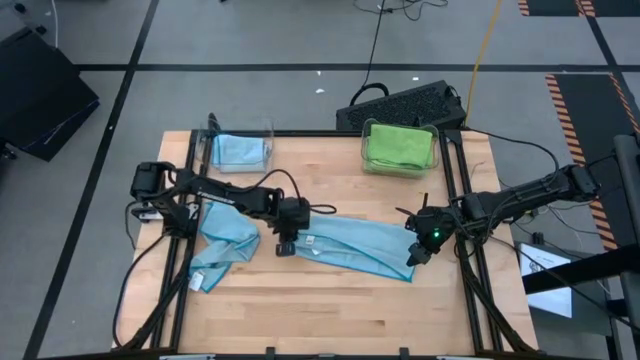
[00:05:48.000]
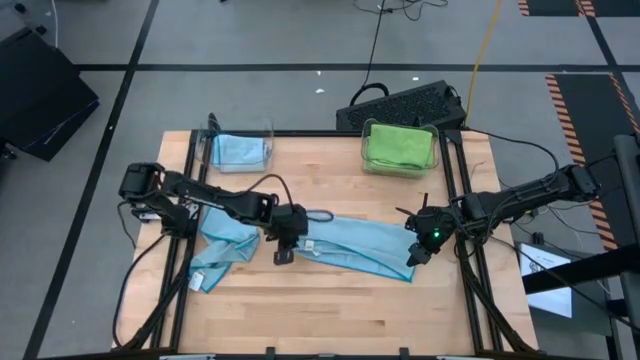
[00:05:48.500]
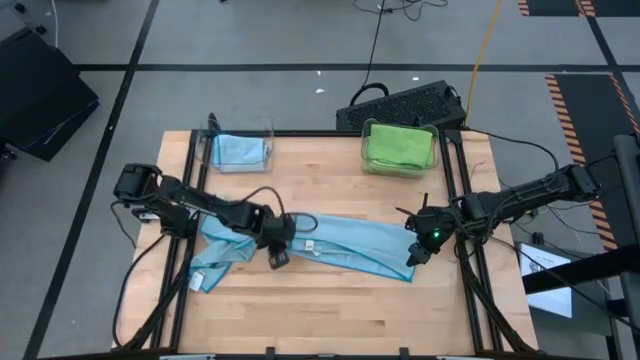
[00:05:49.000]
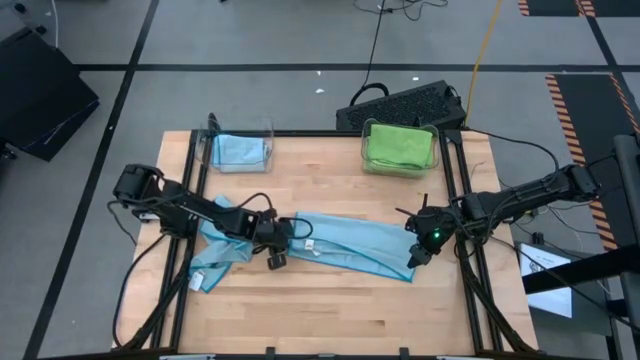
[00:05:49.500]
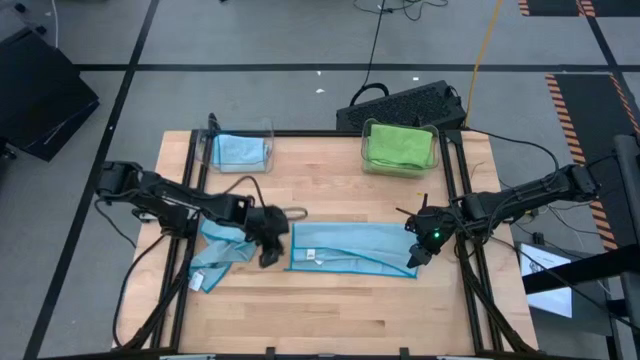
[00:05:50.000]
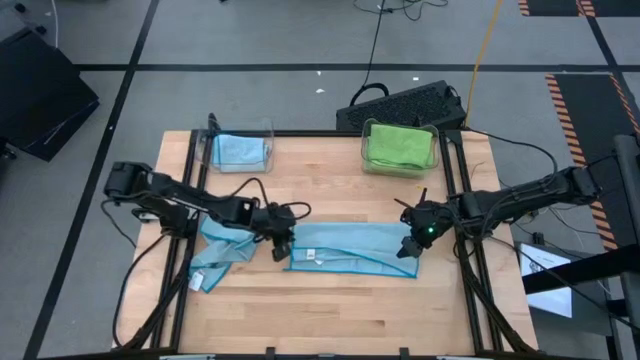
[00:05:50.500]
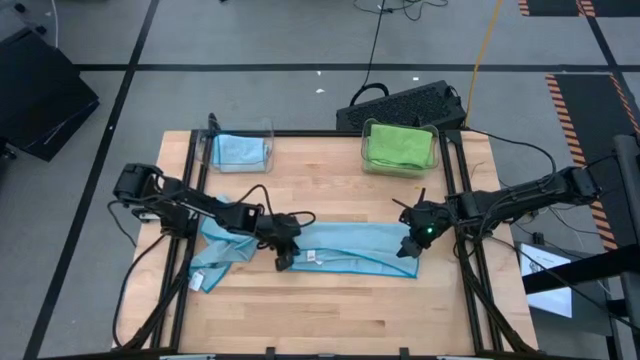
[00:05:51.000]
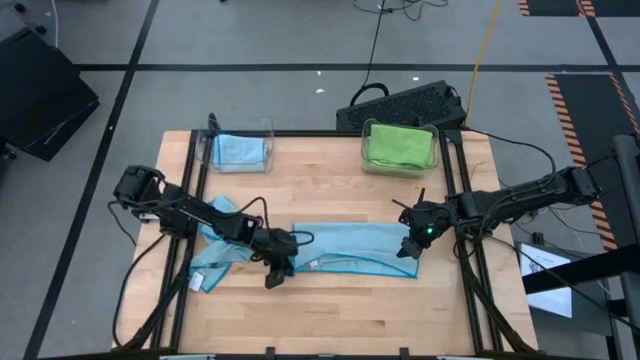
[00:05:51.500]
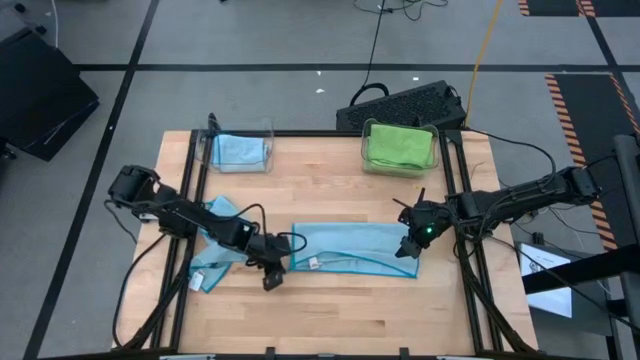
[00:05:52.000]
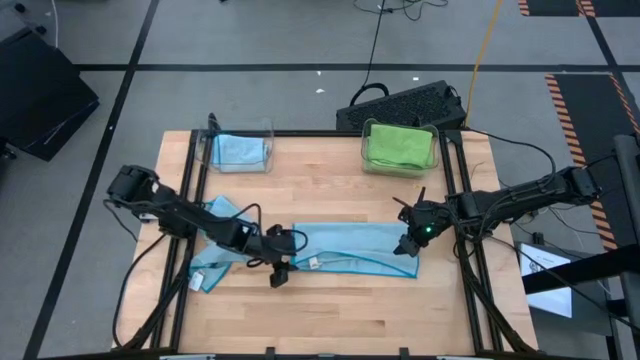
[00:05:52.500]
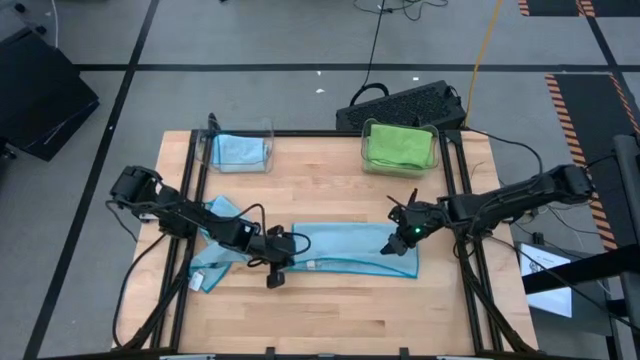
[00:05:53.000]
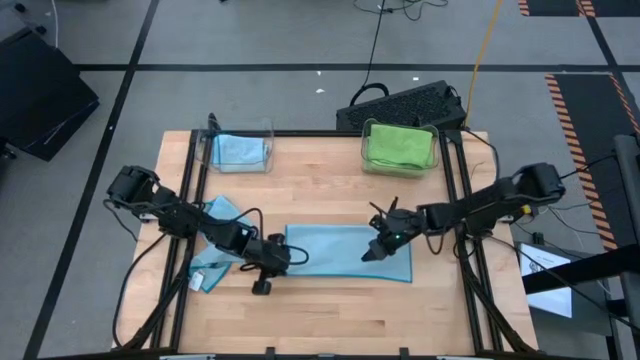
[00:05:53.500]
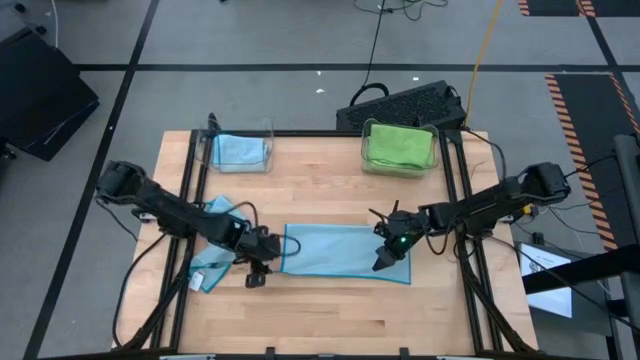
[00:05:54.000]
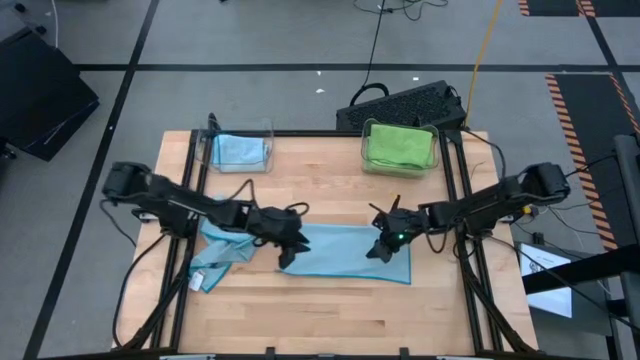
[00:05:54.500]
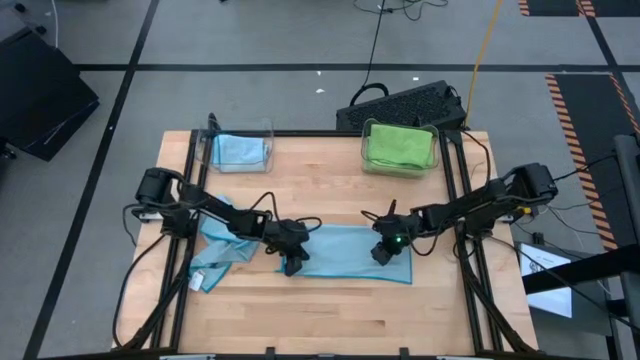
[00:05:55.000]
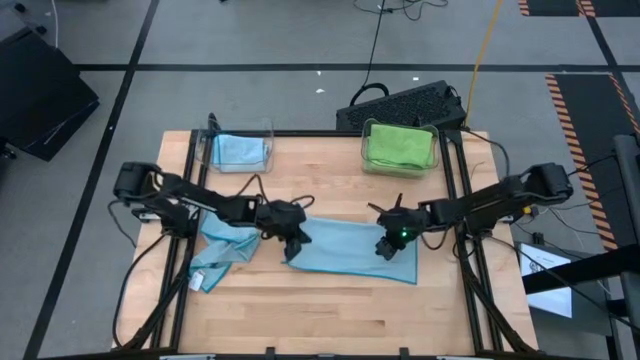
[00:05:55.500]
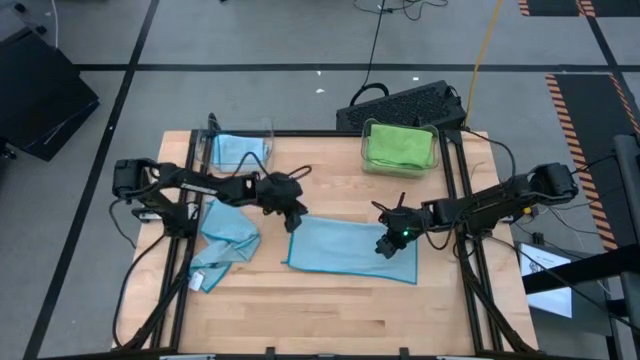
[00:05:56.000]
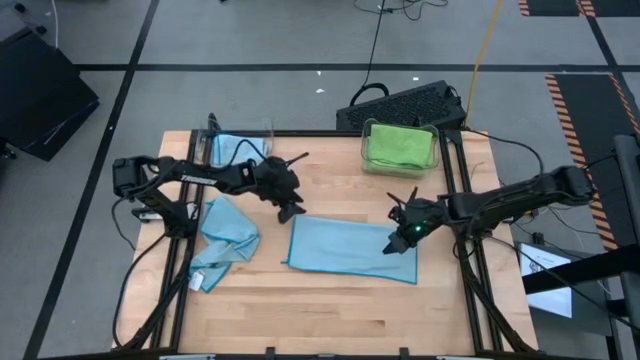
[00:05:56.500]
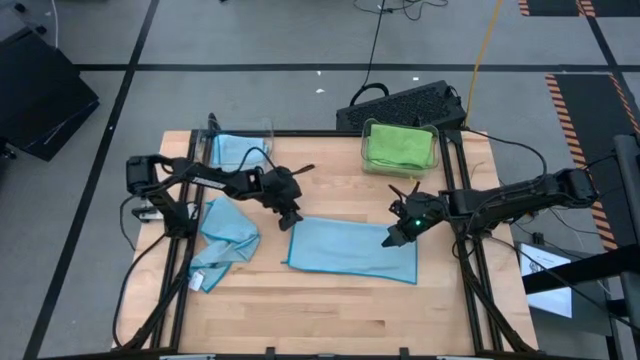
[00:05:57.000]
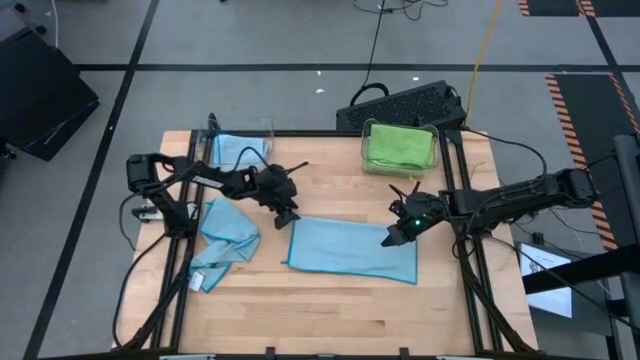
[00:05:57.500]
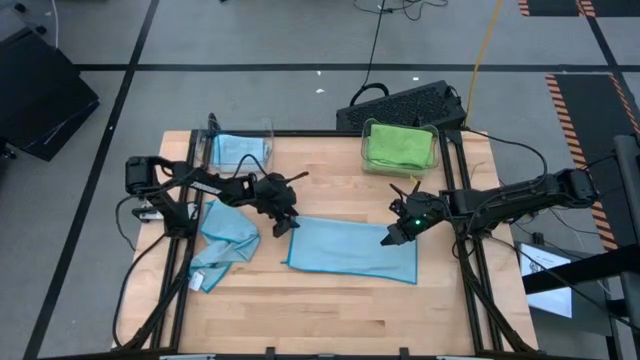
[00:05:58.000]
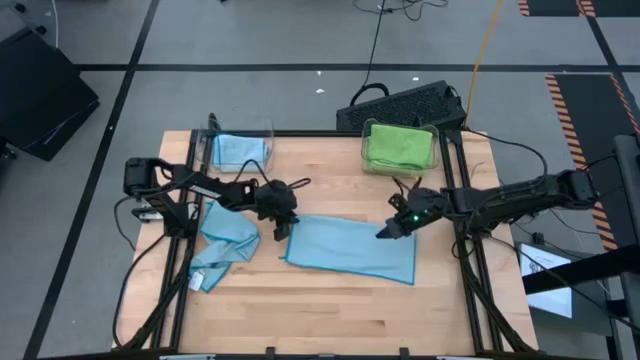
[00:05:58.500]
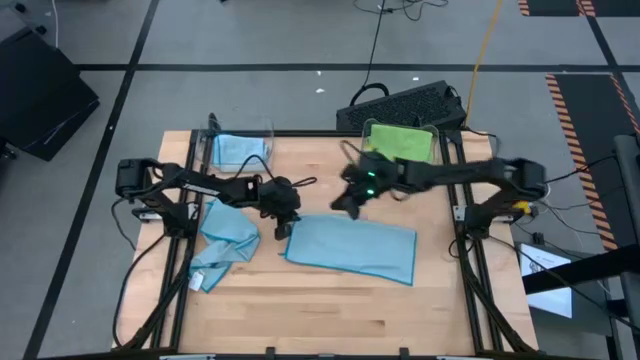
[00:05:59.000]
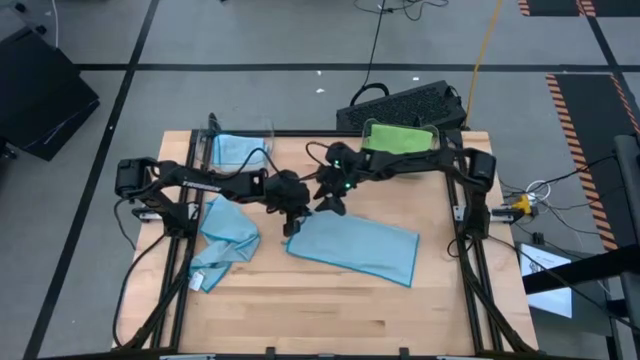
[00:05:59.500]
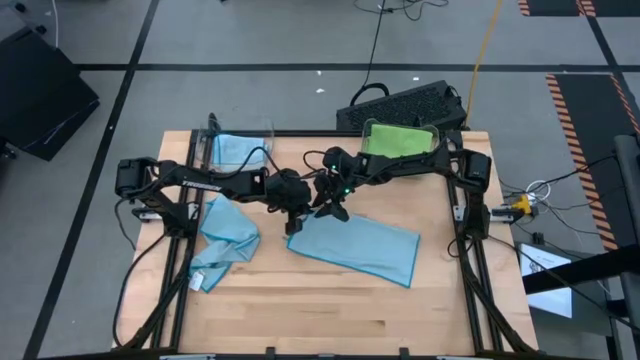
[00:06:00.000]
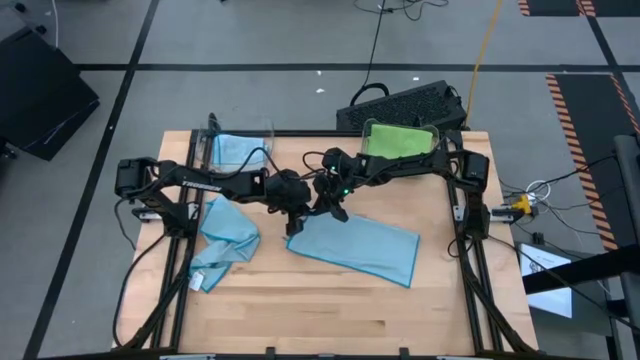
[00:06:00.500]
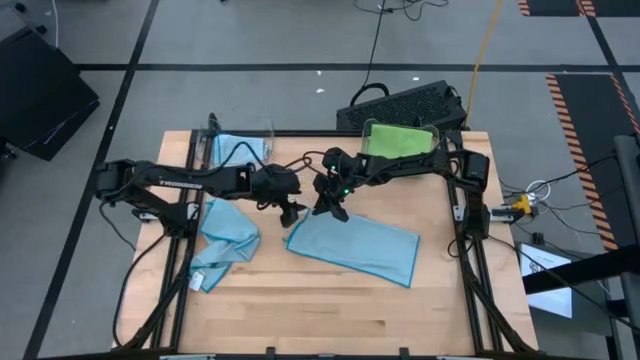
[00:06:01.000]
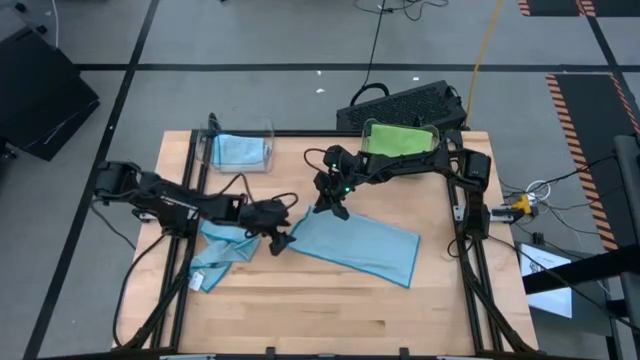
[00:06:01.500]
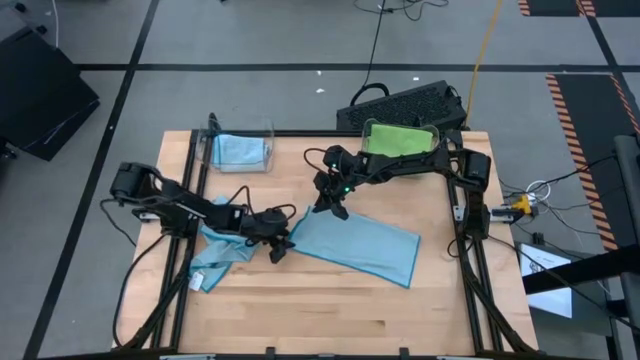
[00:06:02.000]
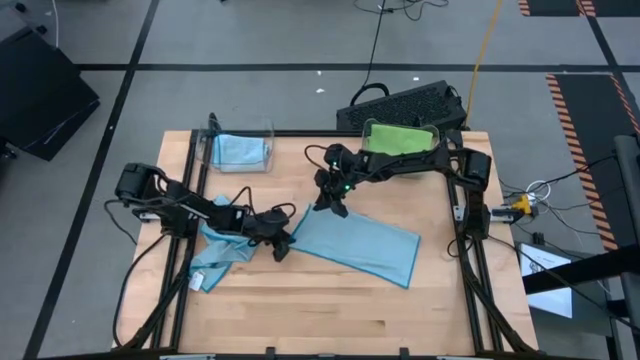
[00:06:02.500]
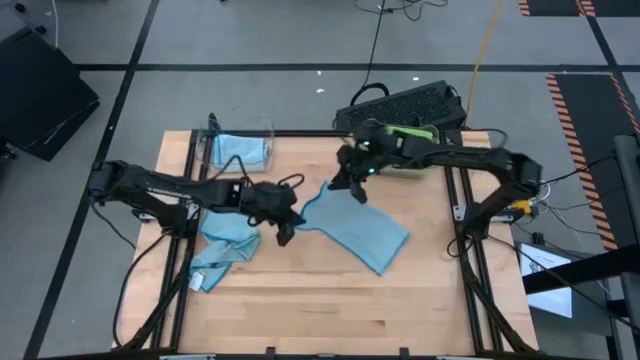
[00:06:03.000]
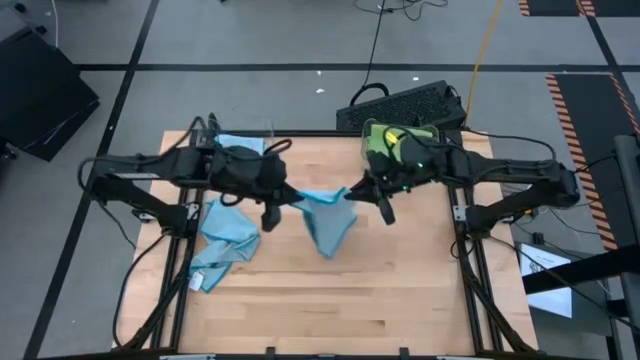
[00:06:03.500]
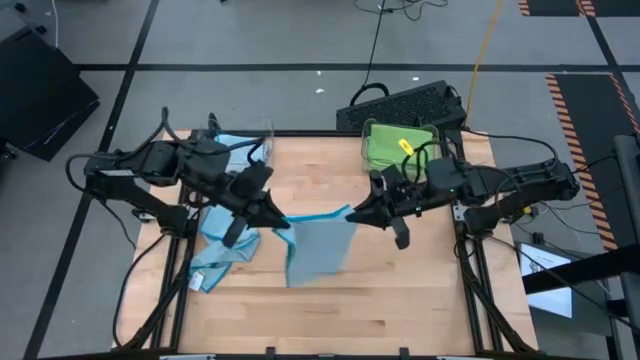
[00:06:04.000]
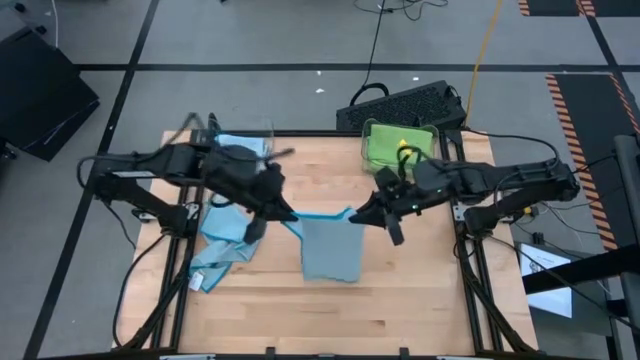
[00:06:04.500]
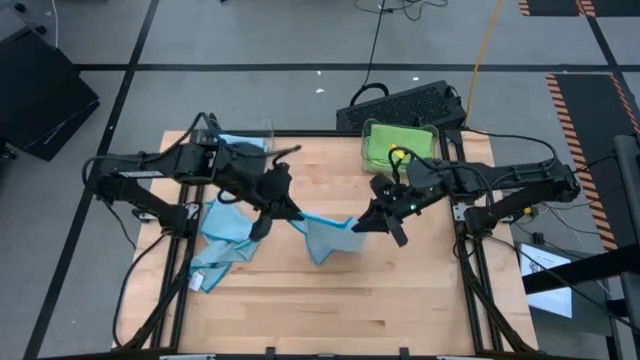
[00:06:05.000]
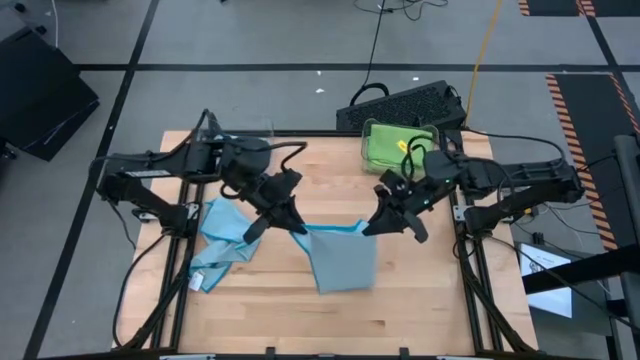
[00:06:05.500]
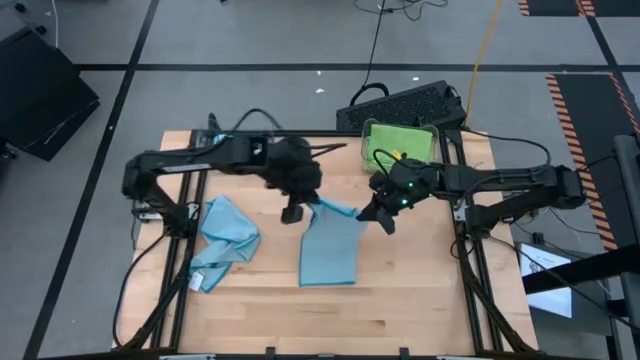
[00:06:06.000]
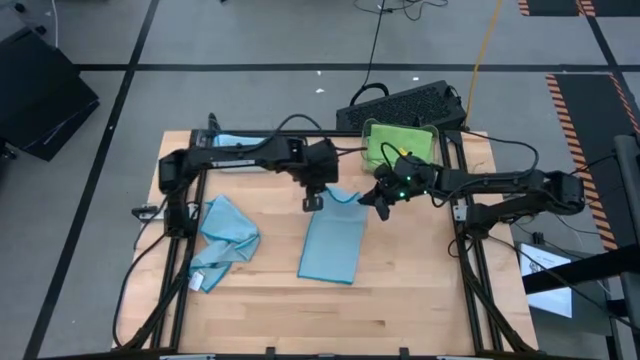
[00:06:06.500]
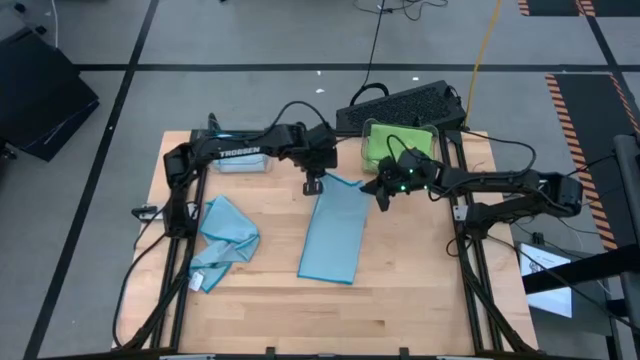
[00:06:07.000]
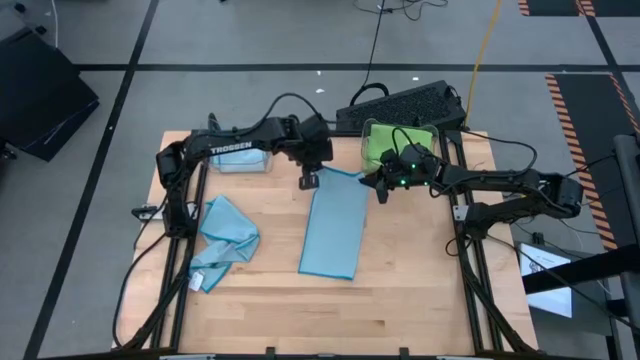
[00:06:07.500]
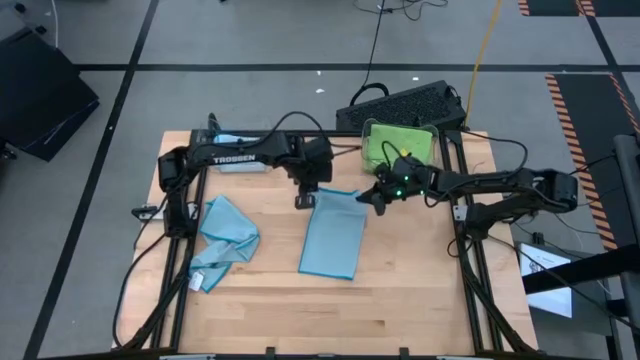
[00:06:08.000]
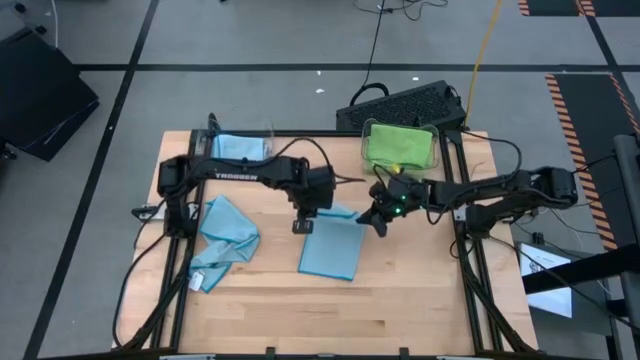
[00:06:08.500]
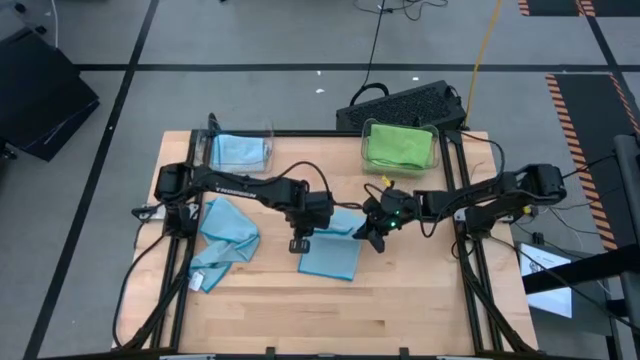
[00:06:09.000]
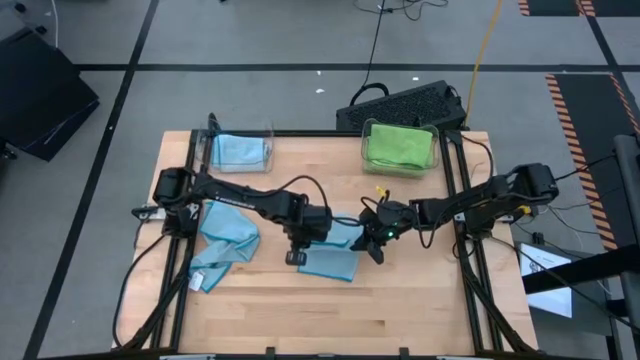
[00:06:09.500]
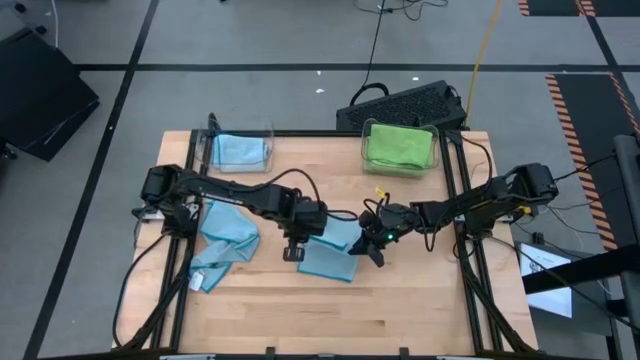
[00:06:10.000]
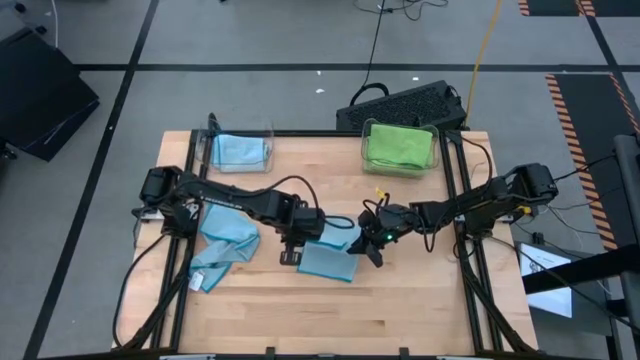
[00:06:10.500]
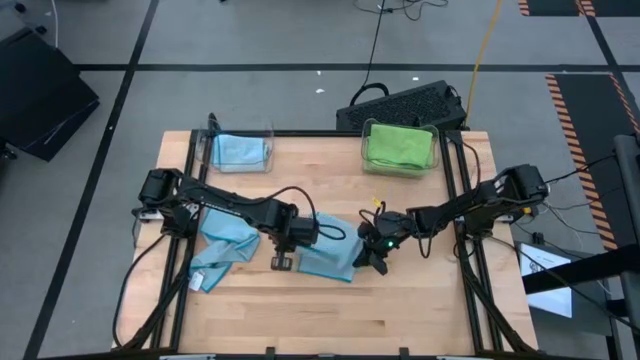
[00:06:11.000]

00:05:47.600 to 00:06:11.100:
Task: Sort microfiber towel by color & place in baskets
Fold the right blue towel
